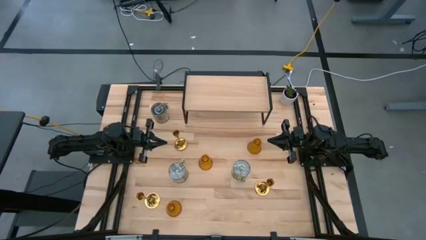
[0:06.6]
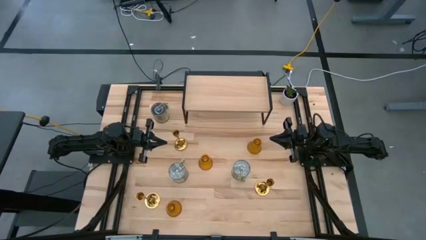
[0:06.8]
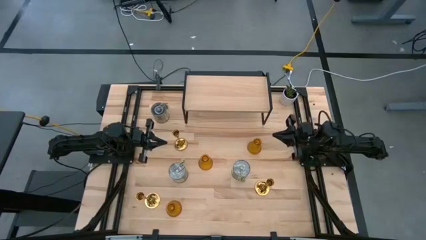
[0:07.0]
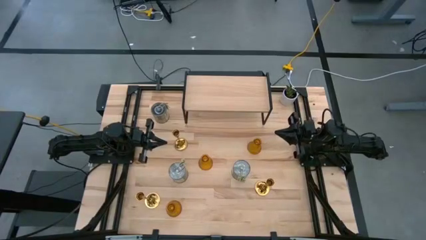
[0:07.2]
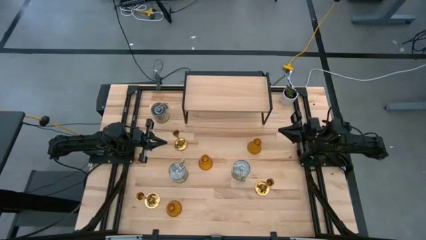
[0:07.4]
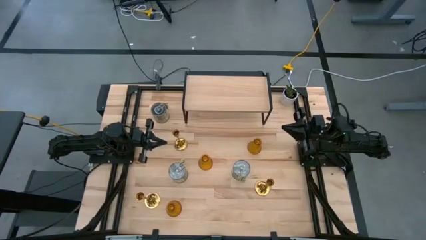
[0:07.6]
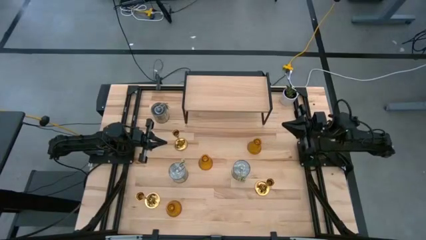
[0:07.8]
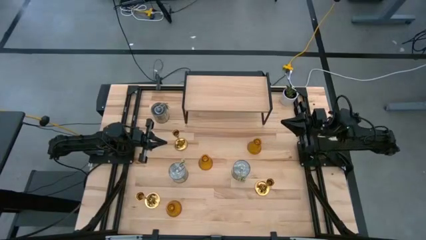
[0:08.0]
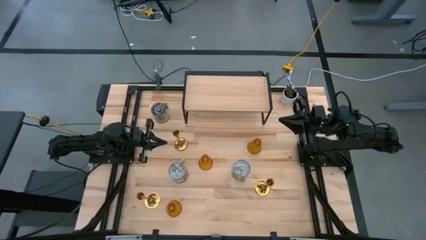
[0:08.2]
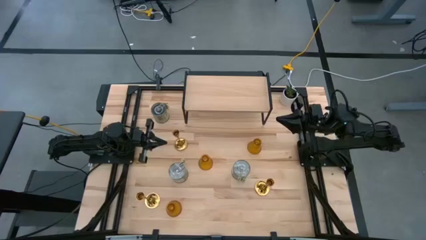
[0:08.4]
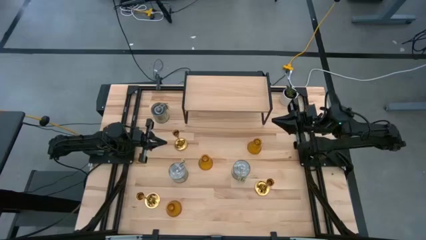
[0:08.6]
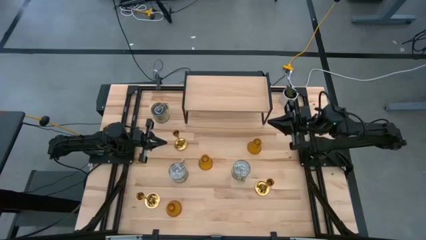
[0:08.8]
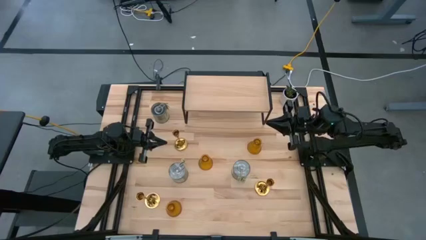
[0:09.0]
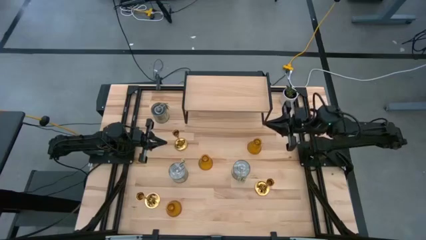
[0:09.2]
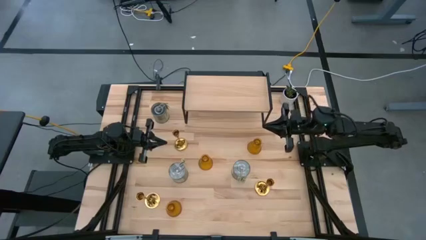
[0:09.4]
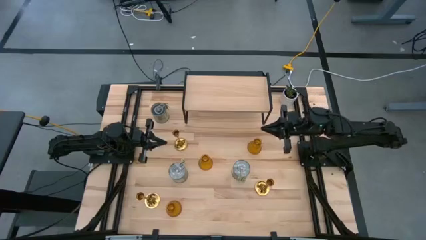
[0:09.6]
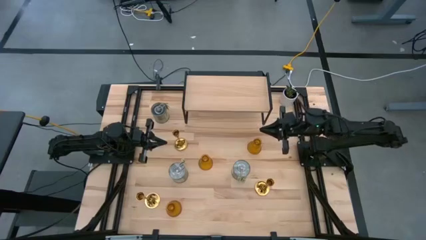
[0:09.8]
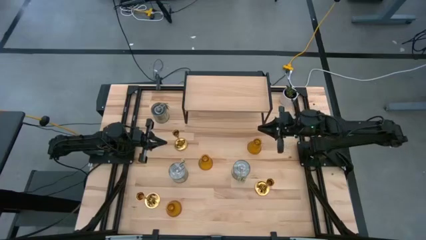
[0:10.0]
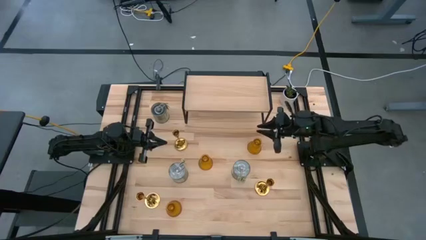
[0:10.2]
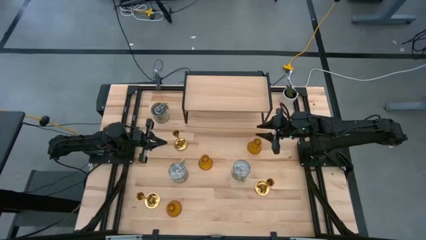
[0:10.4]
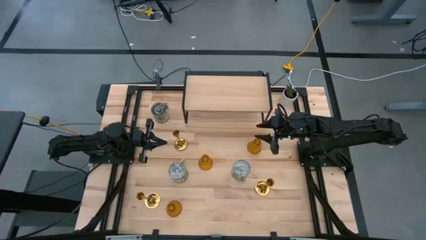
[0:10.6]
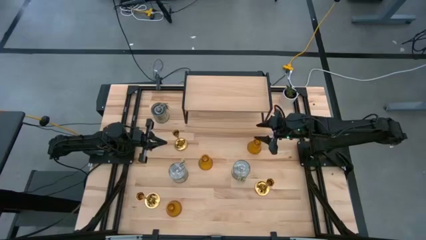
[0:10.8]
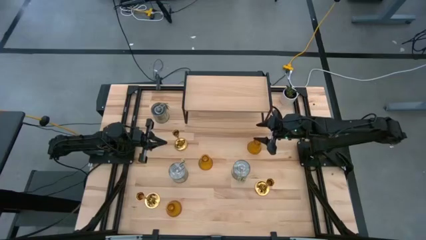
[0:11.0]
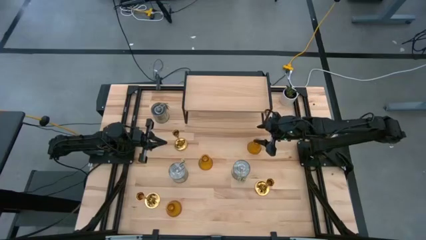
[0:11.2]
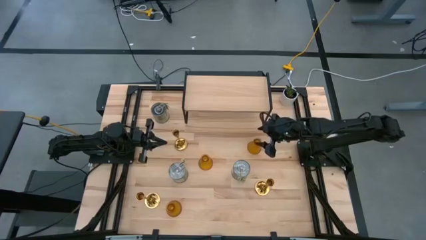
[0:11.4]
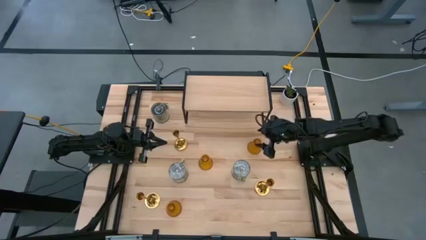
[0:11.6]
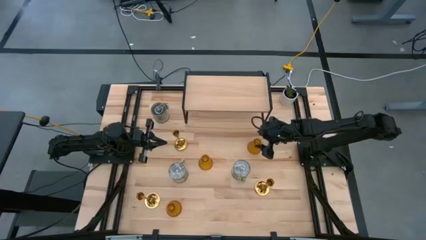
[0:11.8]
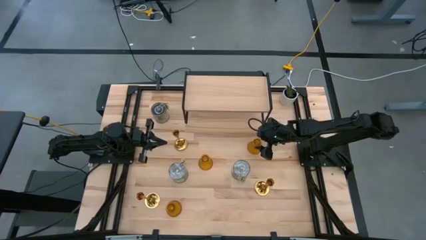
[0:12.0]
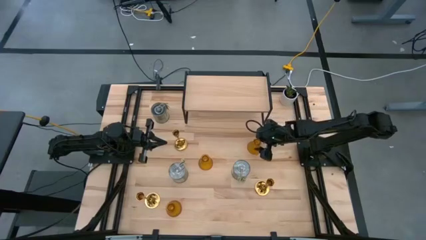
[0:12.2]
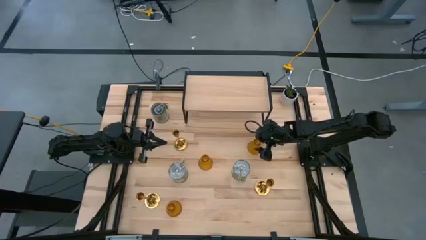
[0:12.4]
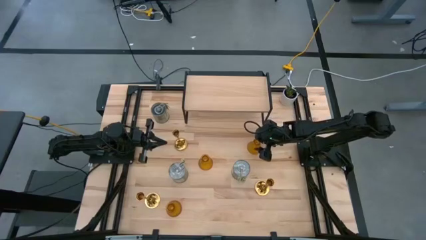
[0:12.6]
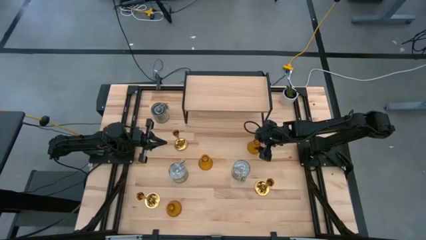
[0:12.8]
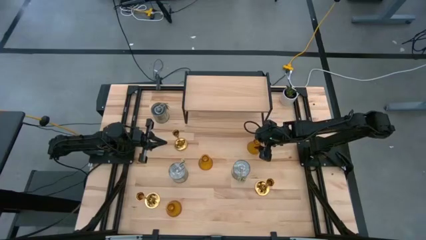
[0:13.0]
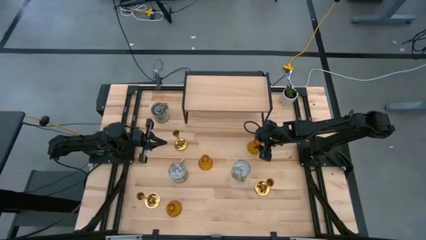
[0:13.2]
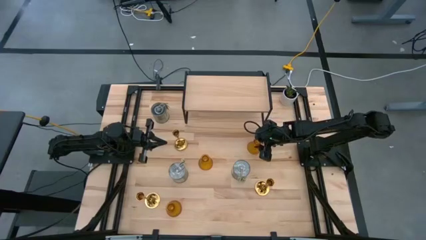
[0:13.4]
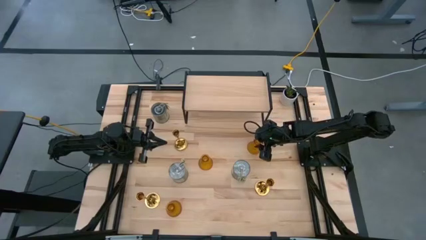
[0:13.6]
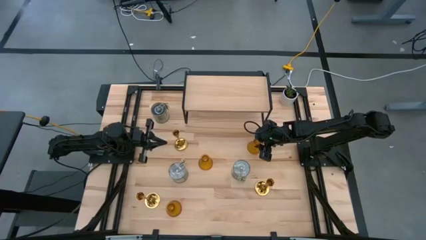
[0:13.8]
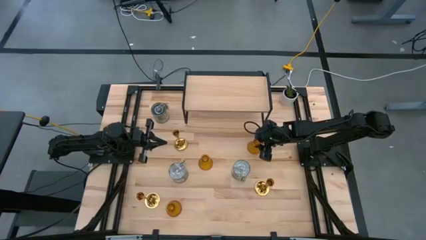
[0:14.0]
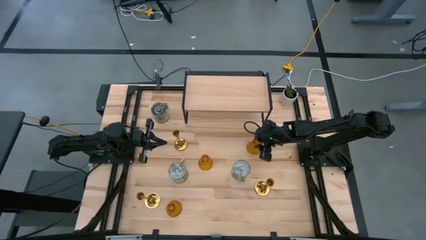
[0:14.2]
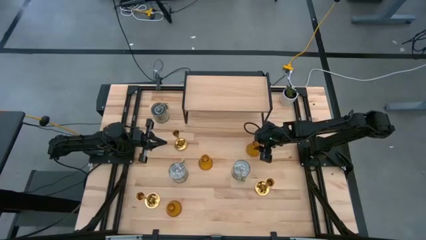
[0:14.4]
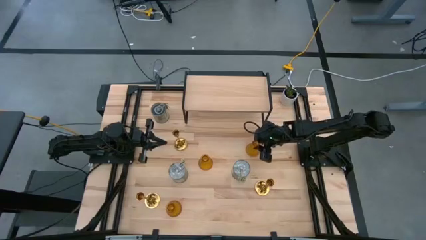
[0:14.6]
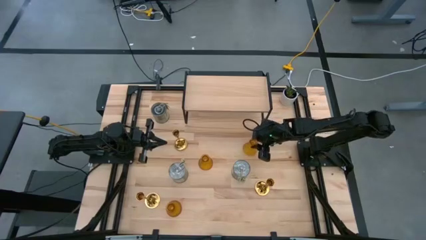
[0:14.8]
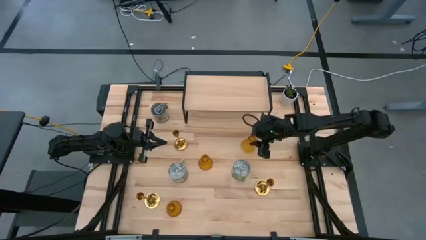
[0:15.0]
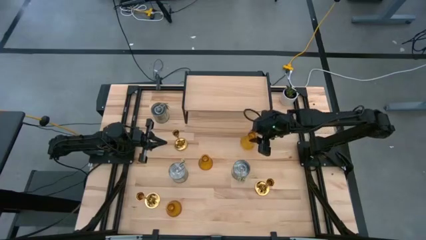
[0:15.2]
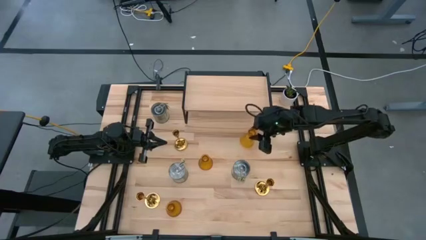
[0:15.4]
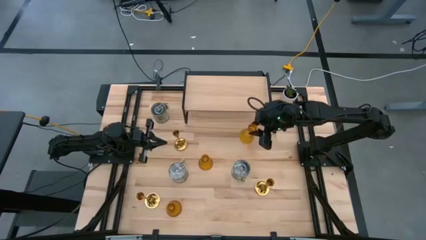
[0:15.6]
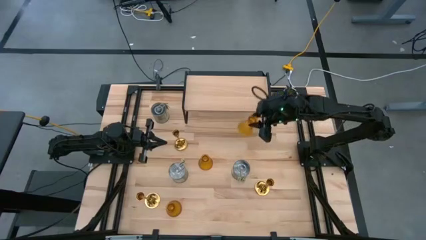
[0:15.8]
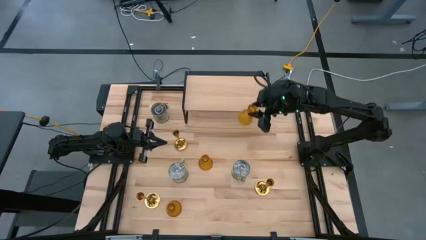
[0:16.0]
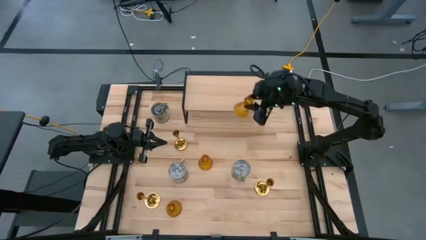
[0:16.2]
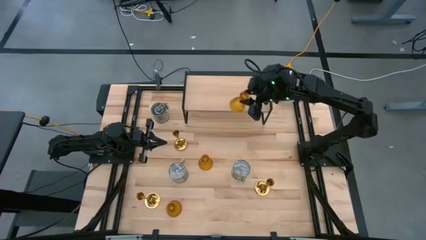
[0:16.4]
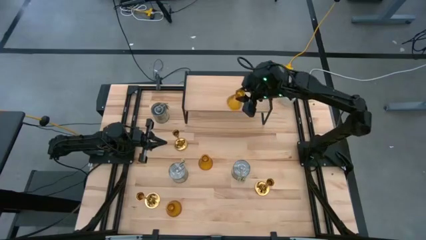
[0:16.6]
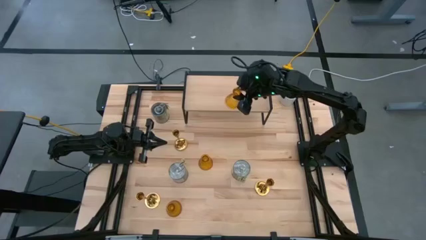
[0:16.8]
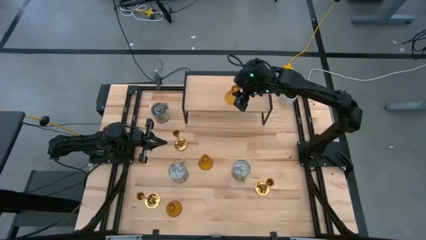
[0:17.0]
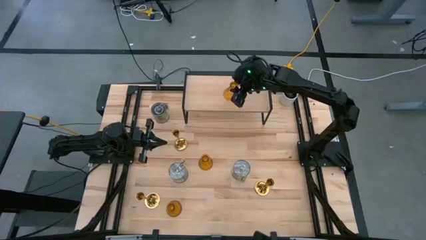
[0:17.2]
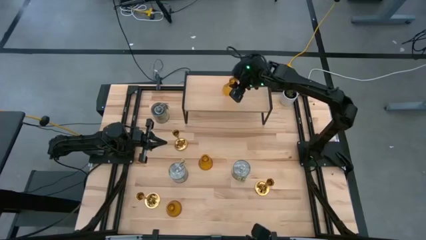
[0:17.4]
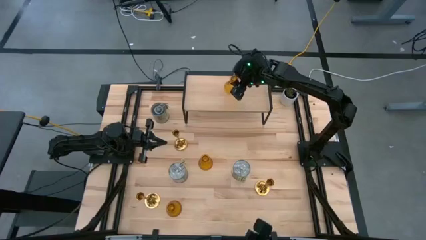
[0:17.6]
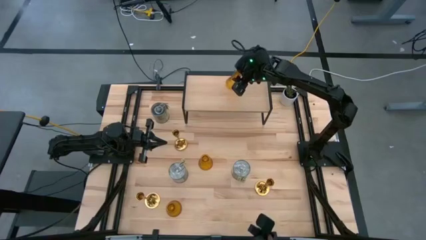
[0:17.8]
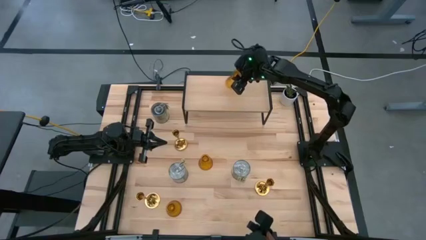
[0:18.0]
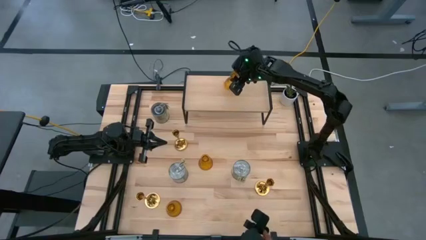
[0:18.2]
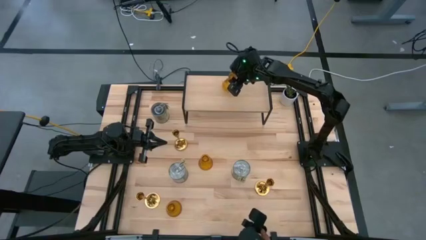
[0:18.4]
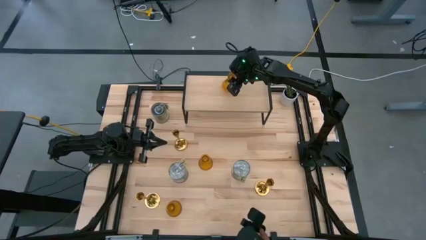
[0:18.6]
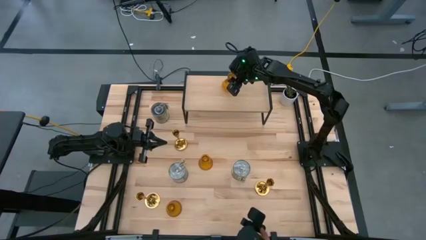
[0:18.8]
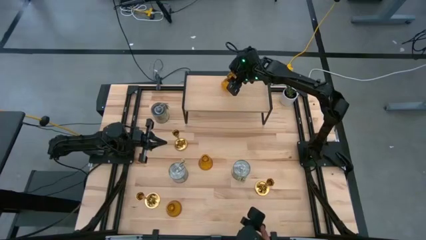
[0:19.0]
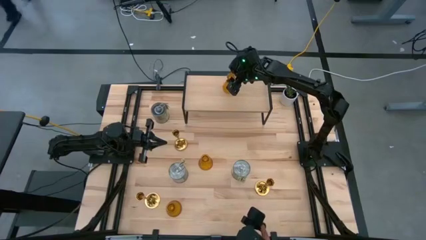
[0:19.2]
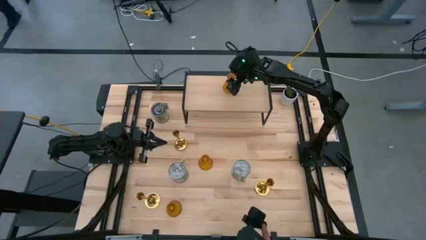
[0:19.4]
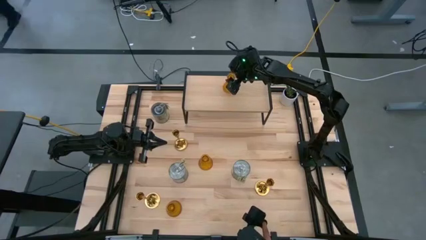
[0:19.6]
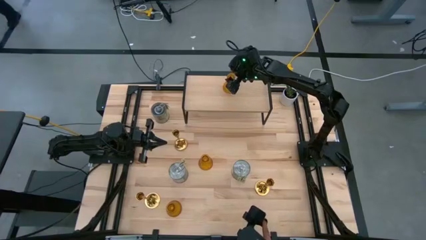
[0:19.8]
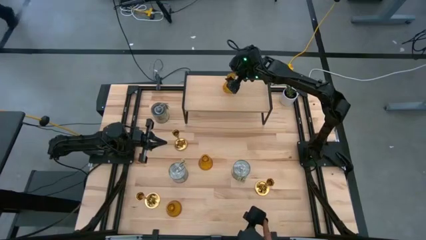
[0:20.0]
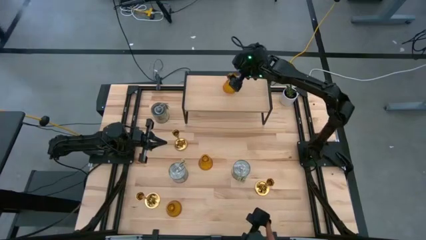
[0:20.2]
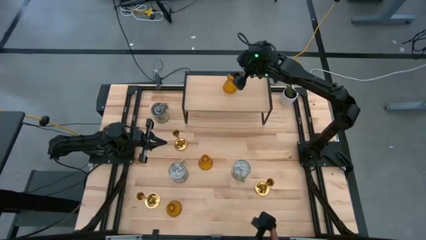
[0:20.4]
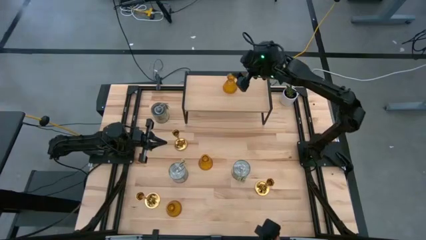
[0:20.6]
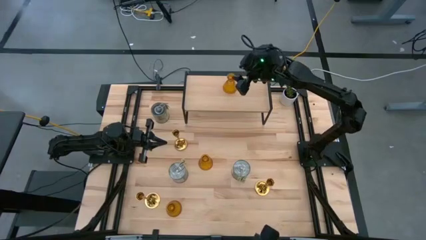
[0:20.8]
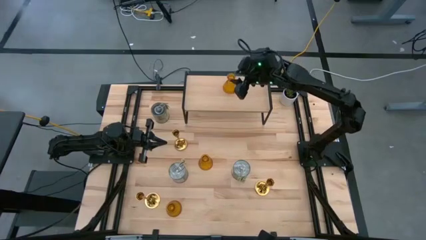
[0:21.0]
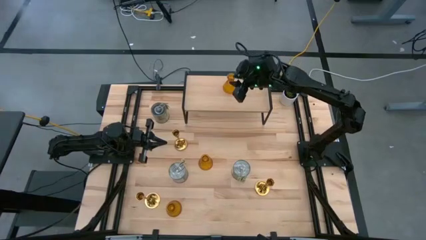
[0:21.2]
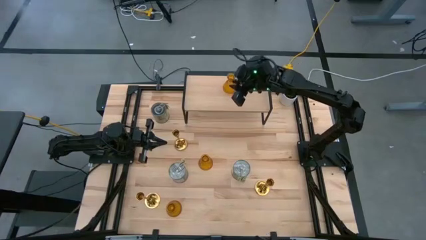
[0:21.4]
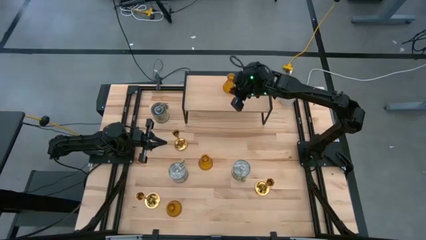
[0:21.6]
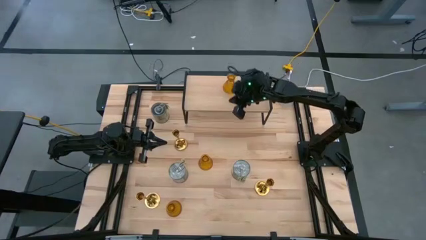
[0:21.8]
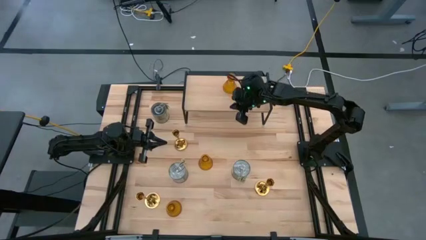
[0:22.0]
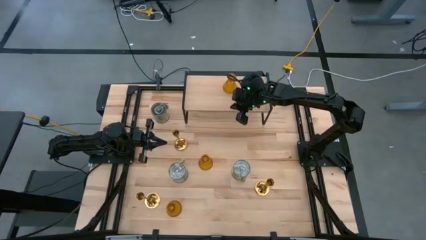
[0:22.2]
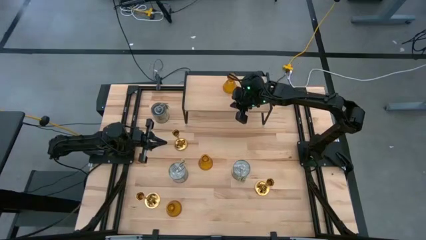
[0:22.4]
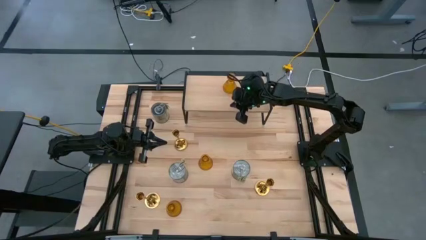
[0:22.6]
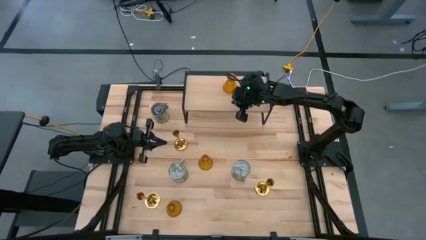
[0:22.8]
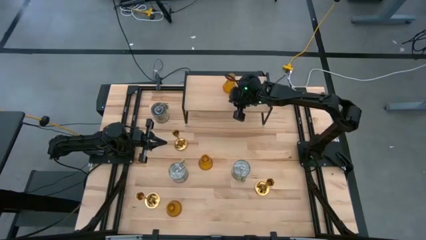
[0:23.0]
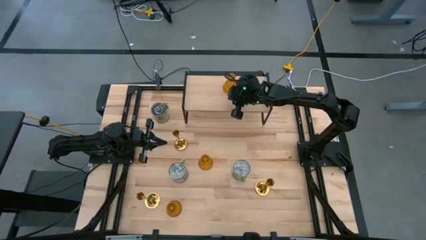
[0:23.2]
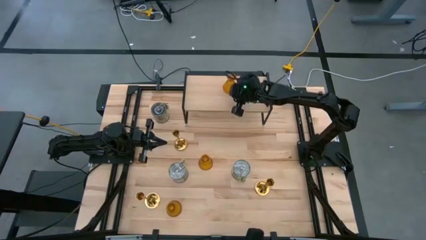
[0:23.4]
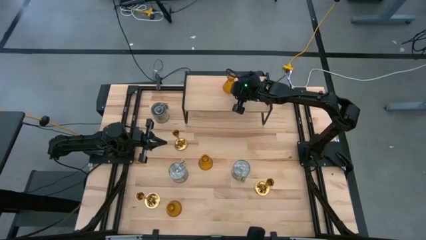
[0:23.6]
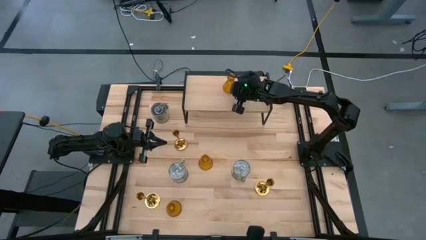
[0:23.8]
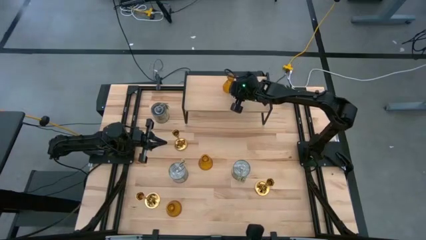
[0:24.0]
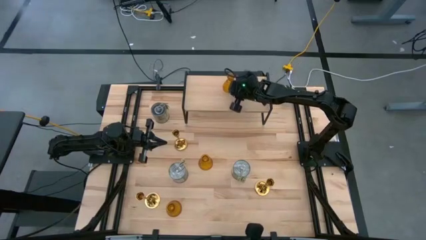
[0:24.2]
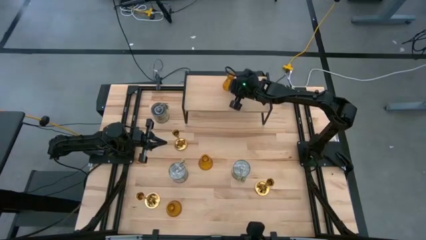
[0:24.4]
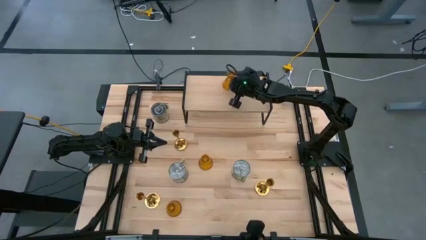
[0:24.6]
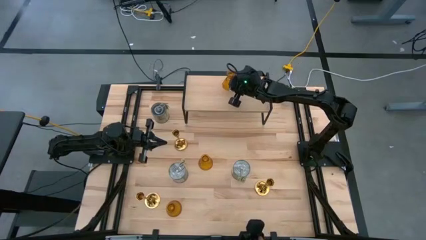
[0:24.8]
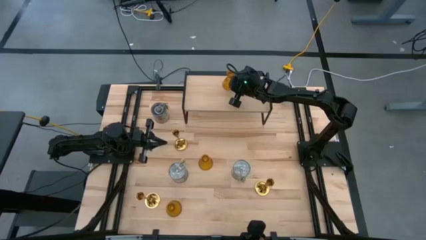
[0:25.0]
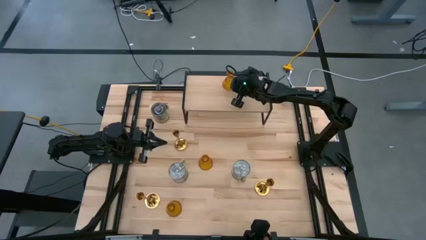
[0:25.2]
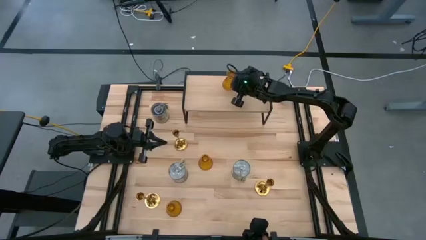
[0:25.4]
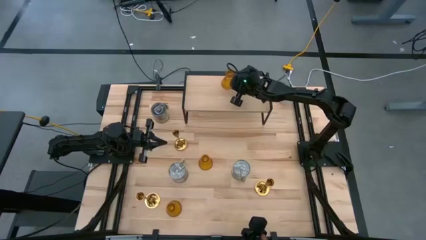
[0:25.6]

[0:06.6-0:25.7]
Task: Pick & Place candle stick holders
Put the top orange glass candle holder on the shelf
